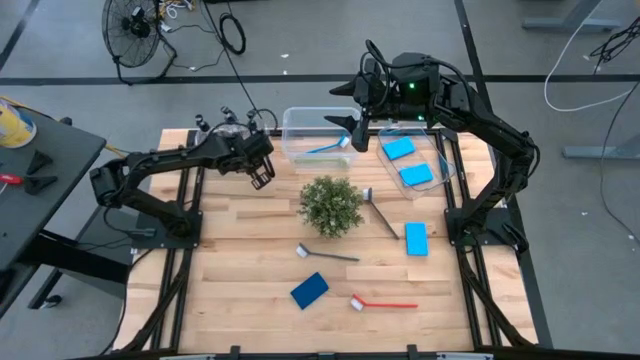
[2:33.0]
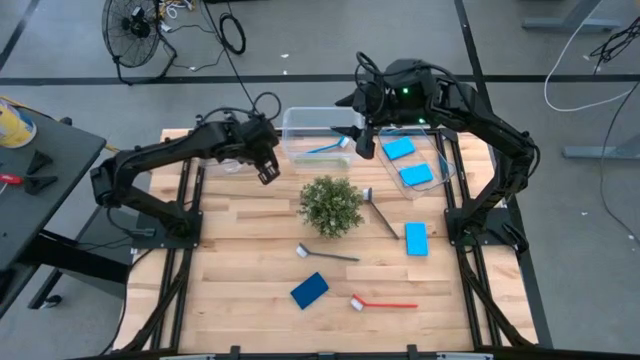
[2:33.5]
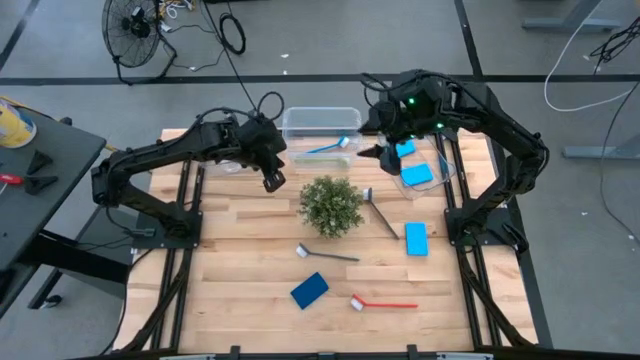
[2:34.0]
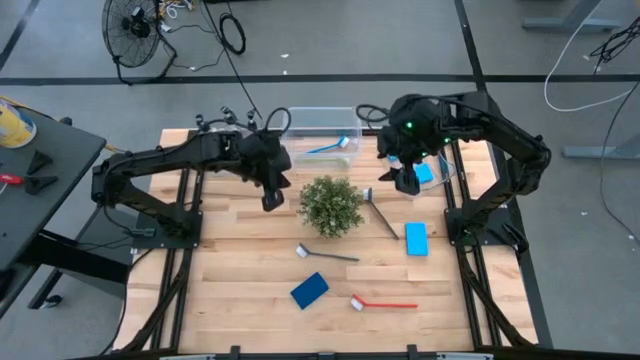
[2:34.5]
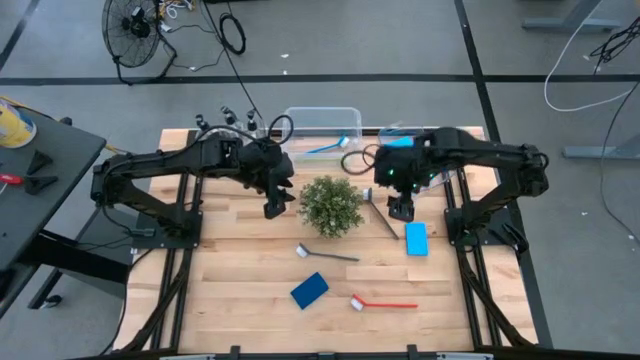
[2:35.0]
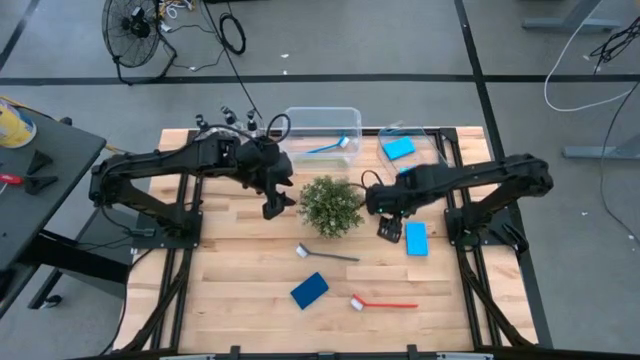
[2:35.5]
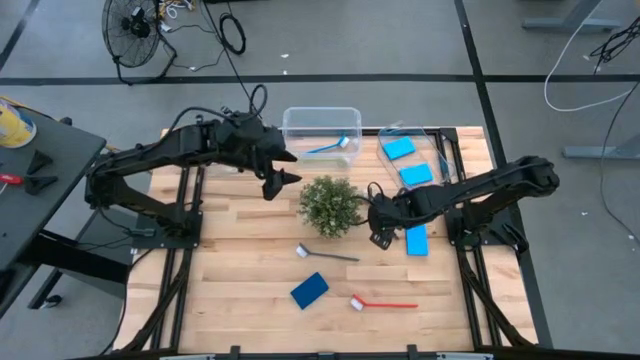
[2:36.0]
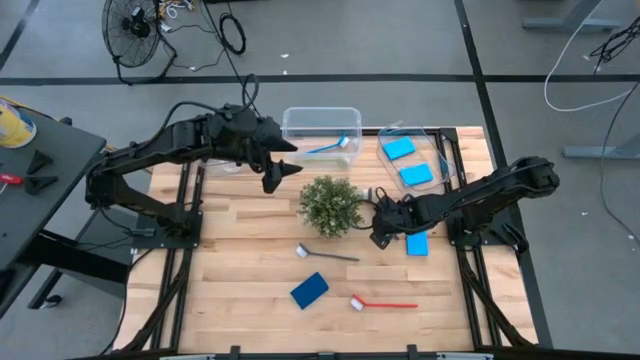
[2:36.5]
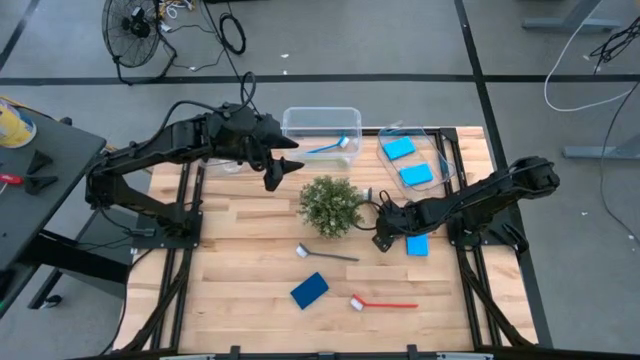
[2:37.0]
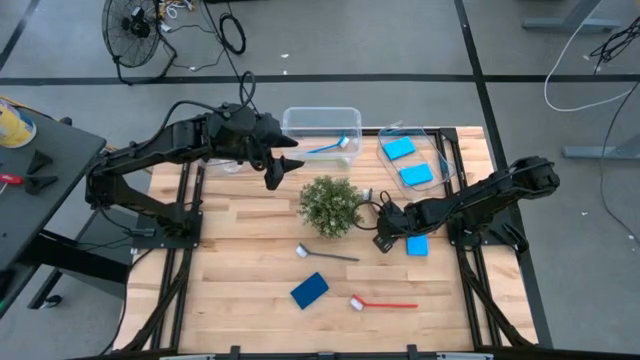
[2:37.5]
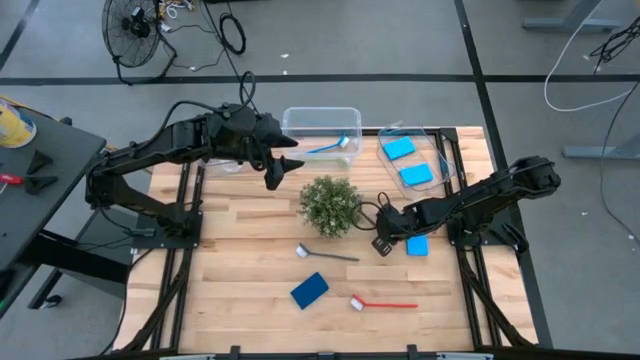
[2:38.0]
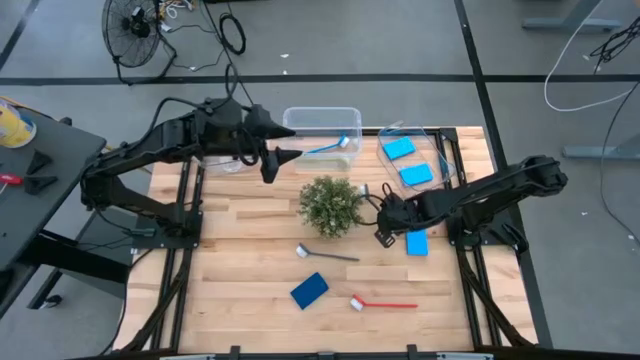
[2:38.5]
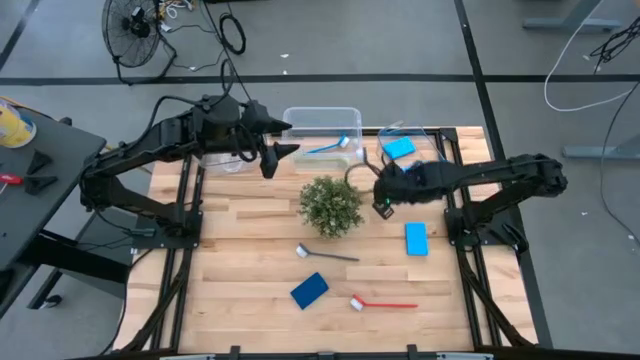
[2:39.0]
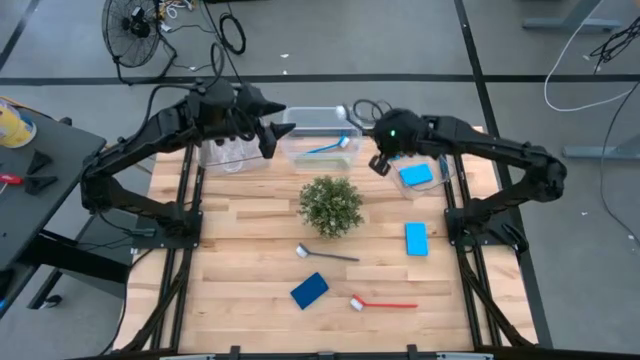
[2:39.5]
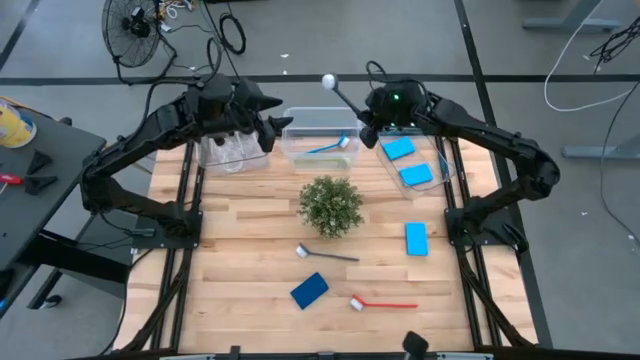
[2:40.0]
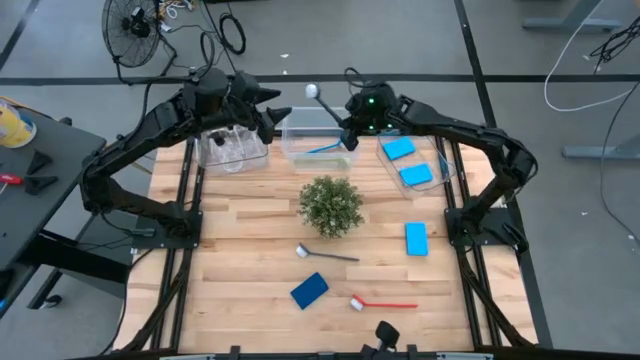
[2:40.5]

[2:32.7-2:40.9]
Task: Pick & Place Kitchen Sink Supplies
Put the gray dish brush into the white bin

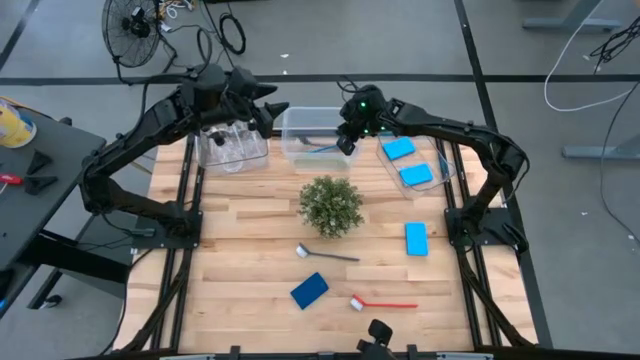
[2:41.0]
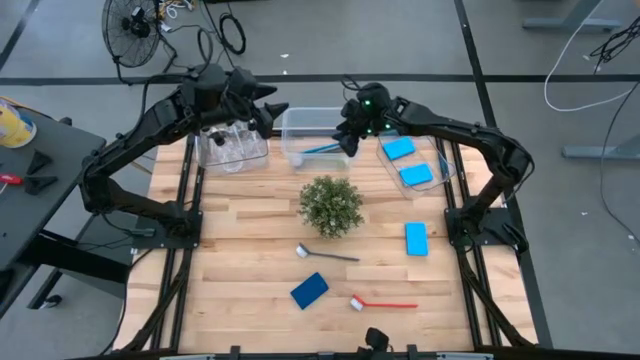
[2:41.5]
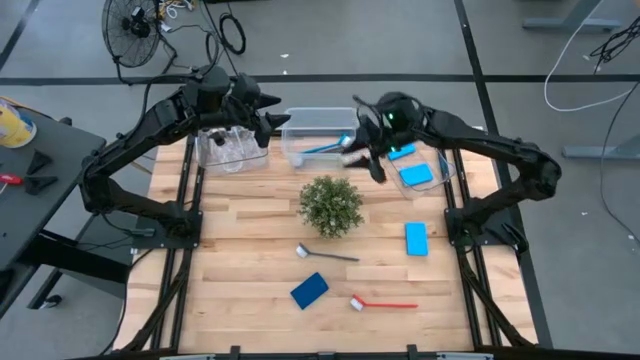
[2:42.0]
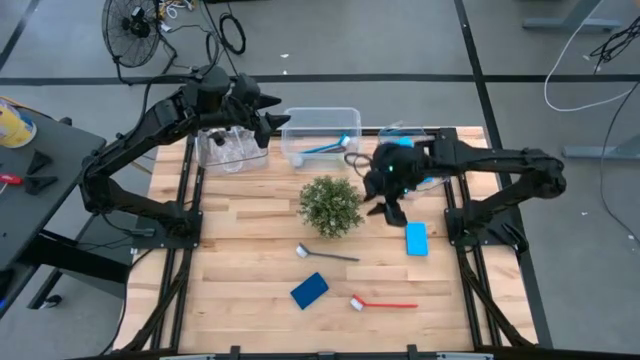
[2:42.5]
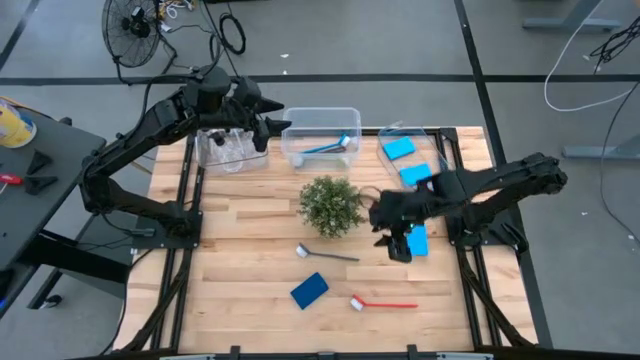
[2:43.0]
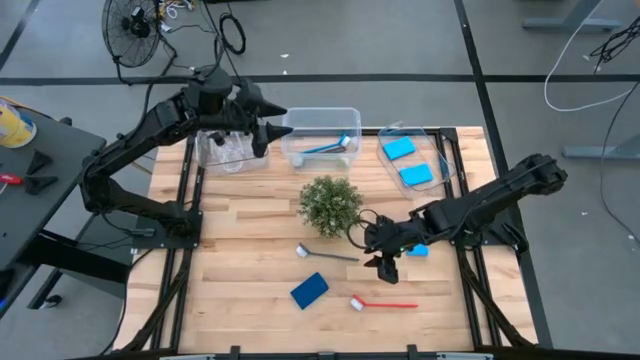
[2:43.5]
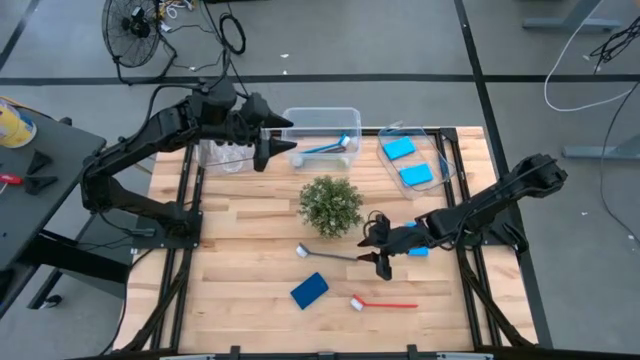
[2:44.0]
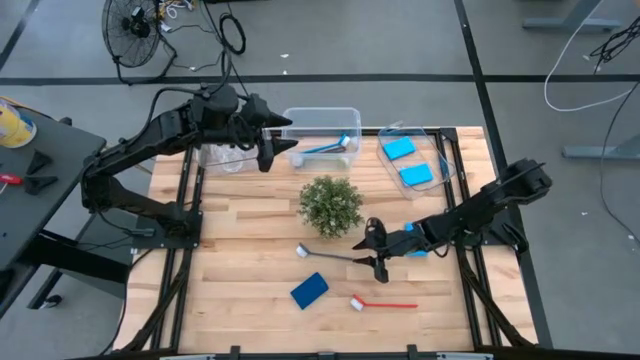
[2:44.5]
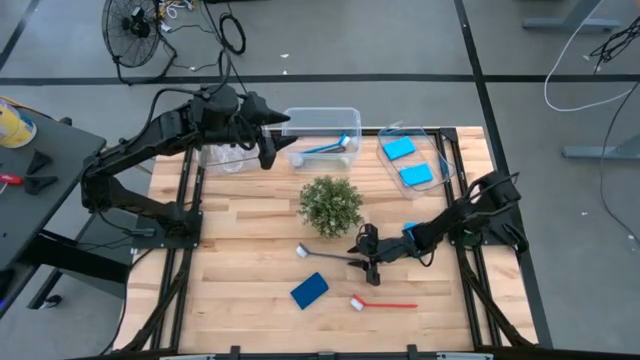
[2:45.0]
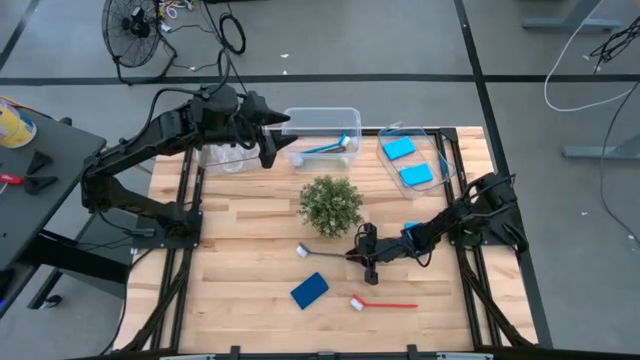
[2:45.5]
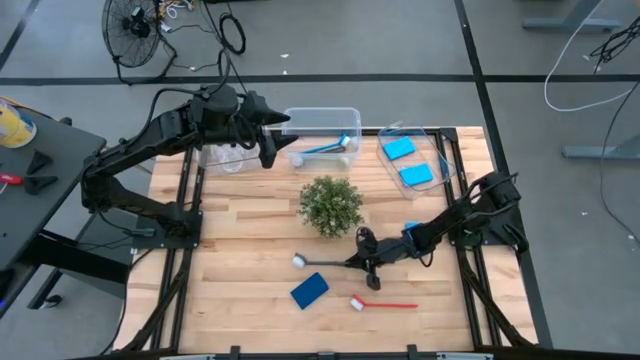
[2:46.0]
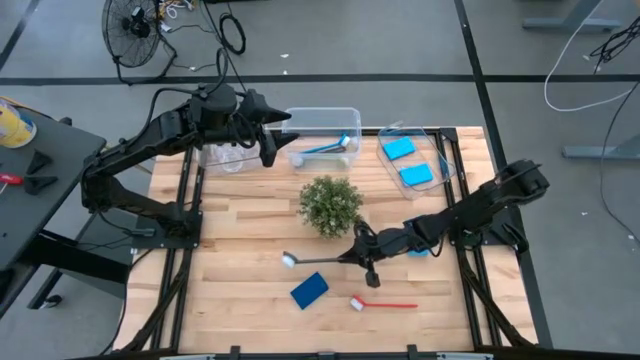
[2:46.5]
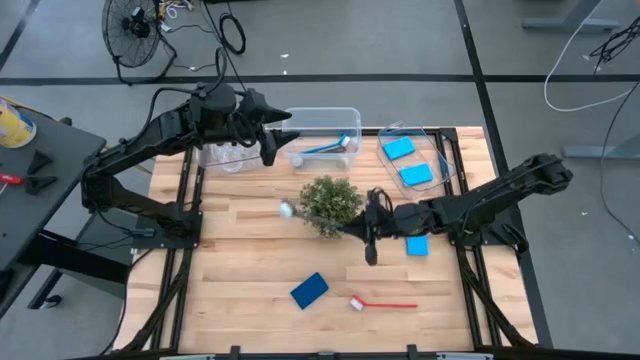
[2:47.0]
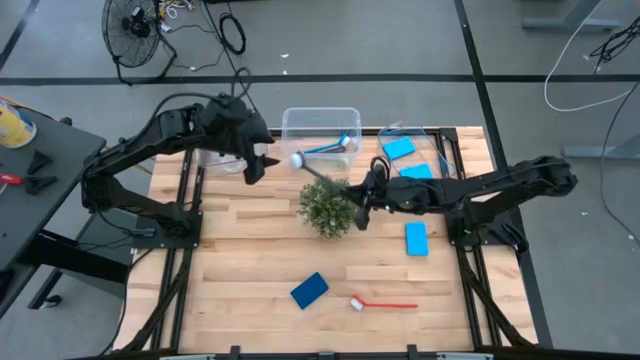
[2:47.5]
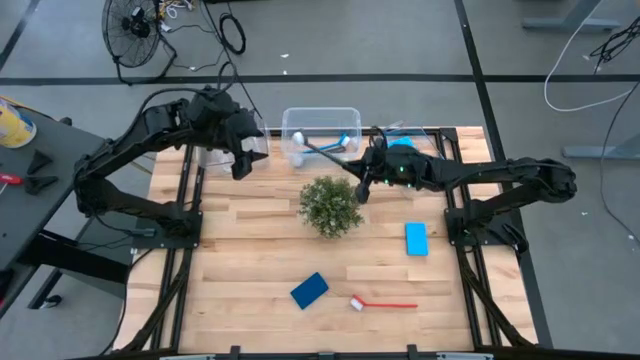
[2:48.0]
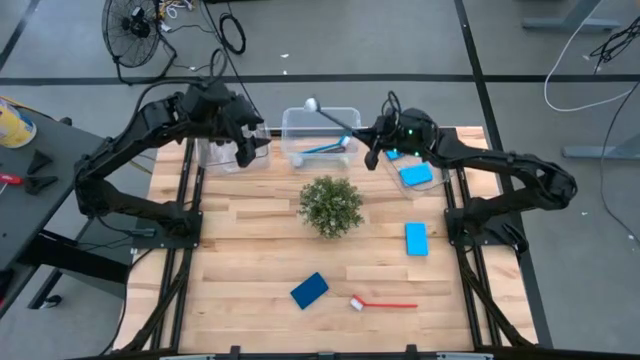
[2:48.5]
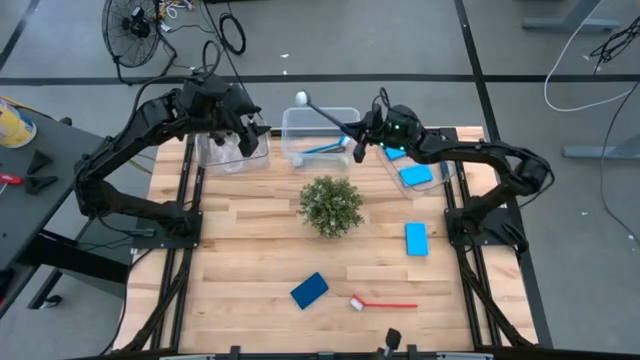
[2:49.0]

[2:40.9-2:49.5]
Put the gray dish brush into the white bin

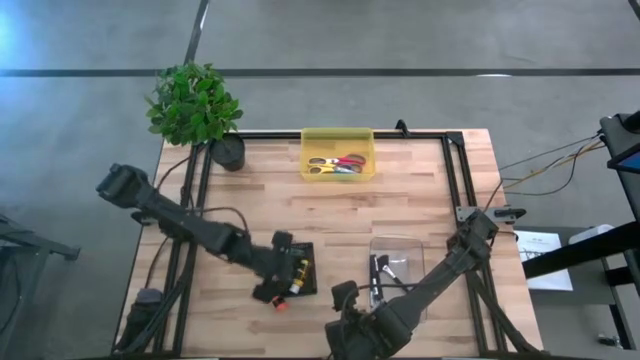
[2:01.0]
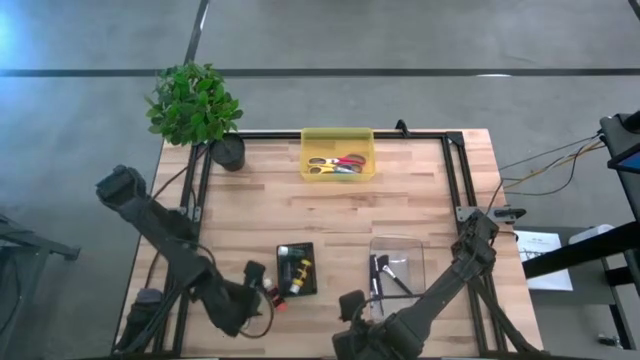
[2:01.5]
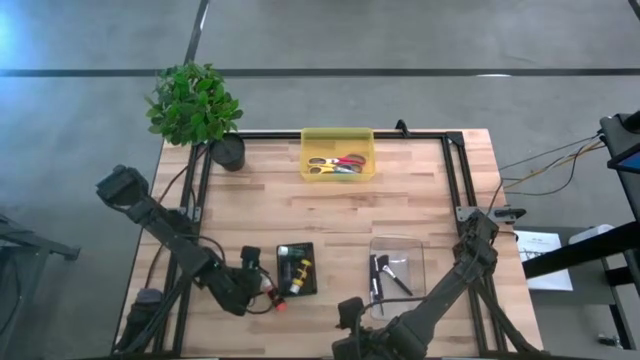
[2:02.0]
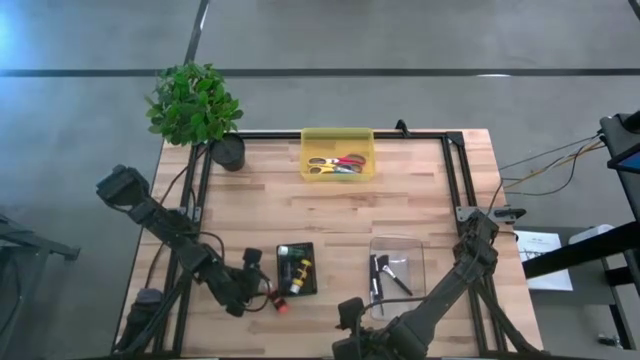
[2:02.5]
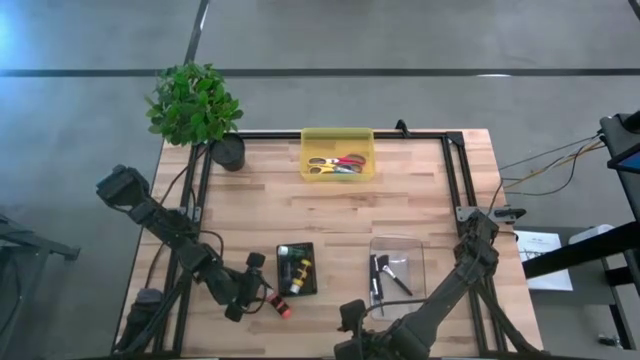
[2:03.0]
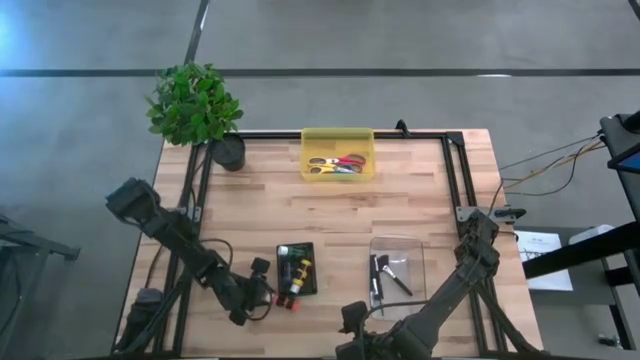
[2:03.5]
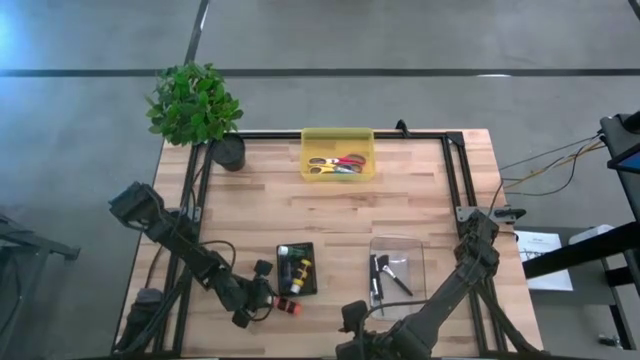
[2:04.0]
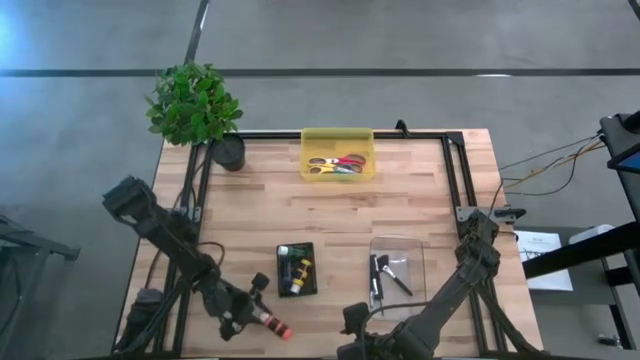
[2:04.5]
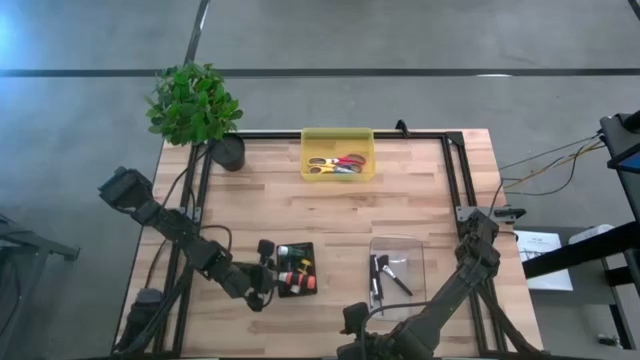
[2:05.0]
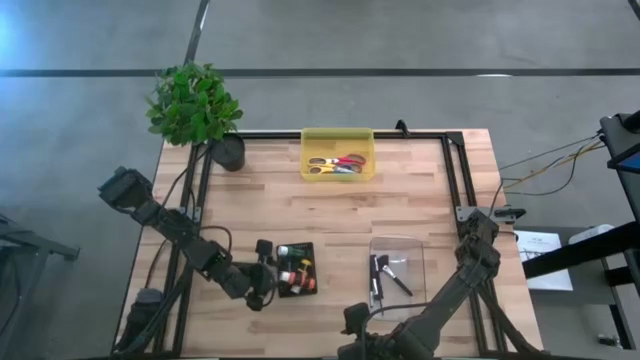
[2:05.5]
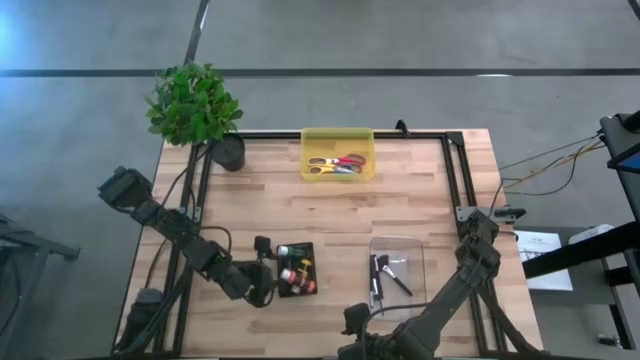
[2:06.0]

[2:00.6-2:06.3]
Task: Pick & Place Paint Supplies
Put the orange paint bottle into the black bin
